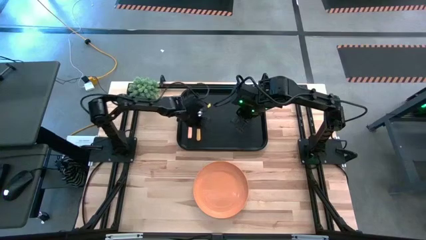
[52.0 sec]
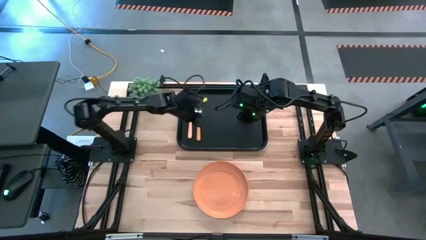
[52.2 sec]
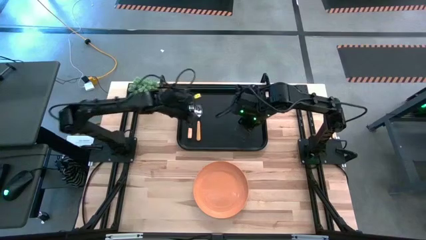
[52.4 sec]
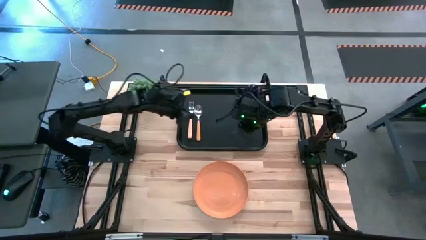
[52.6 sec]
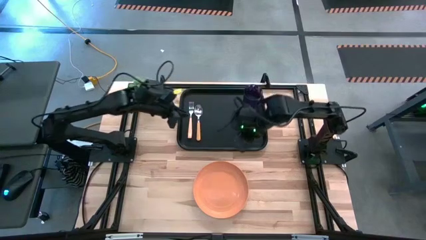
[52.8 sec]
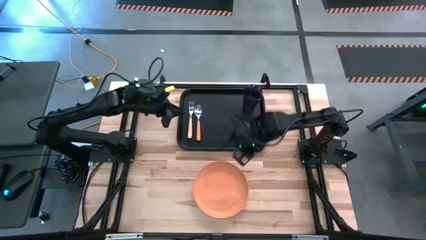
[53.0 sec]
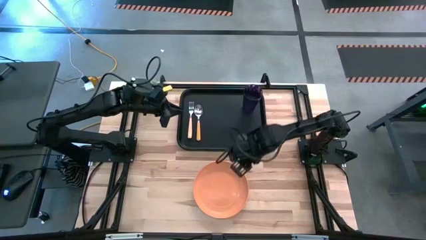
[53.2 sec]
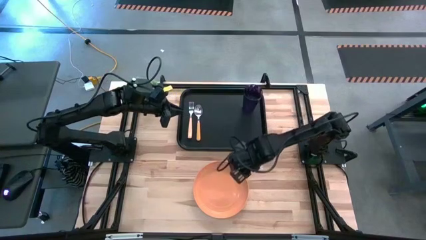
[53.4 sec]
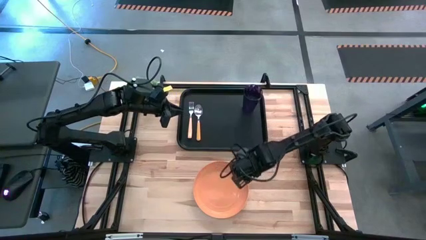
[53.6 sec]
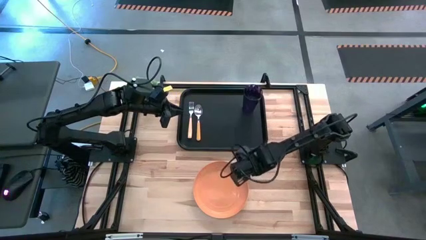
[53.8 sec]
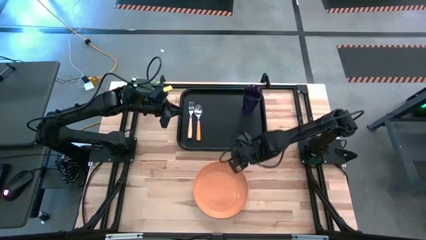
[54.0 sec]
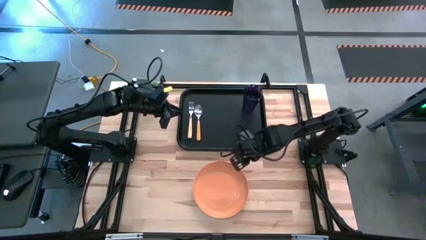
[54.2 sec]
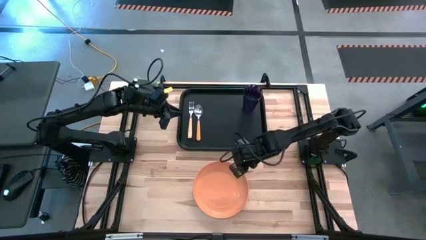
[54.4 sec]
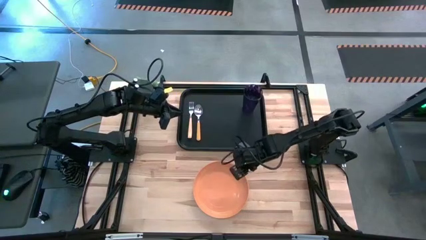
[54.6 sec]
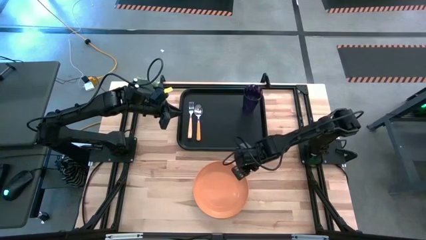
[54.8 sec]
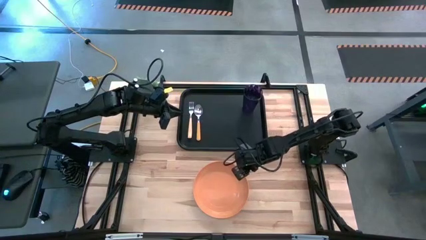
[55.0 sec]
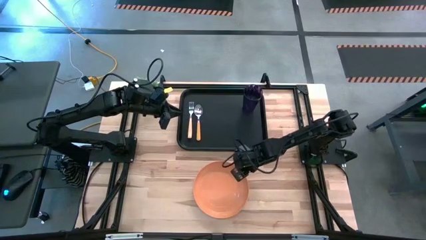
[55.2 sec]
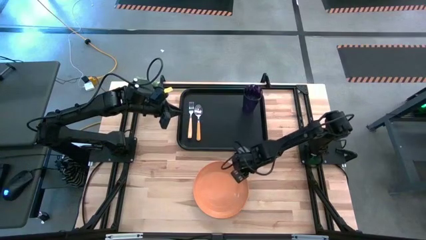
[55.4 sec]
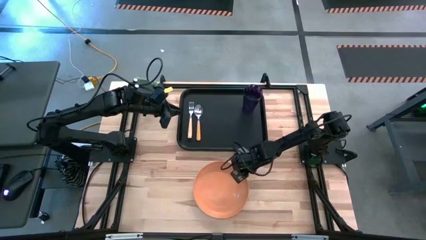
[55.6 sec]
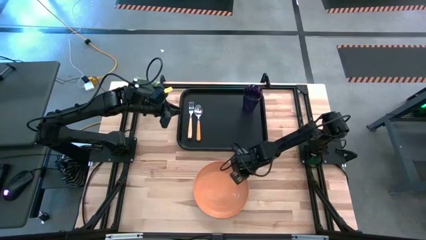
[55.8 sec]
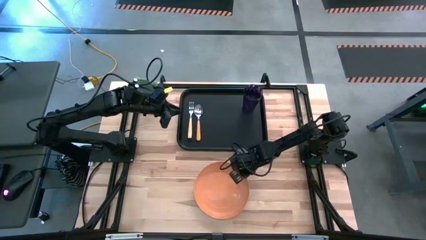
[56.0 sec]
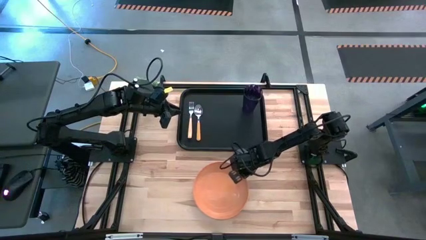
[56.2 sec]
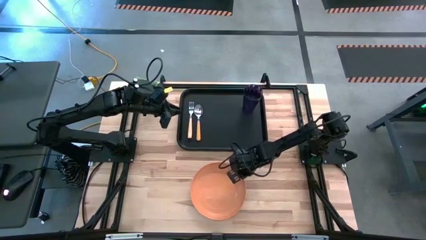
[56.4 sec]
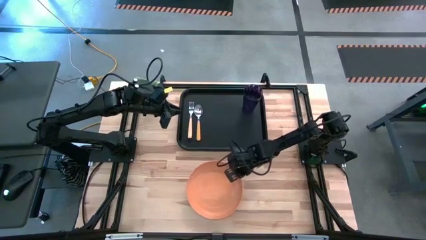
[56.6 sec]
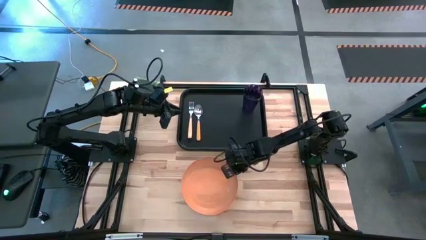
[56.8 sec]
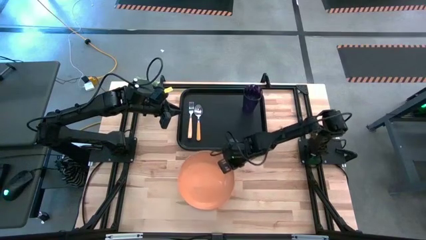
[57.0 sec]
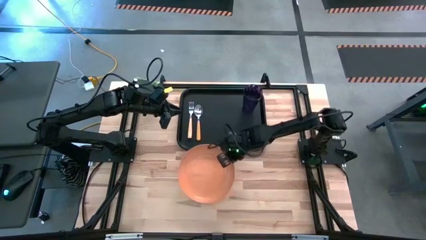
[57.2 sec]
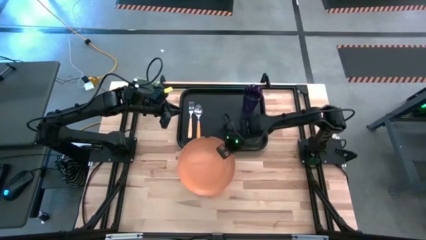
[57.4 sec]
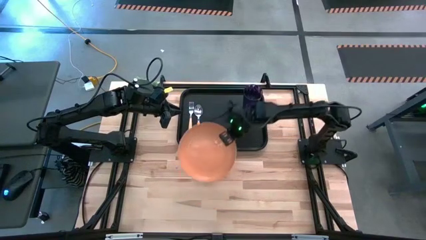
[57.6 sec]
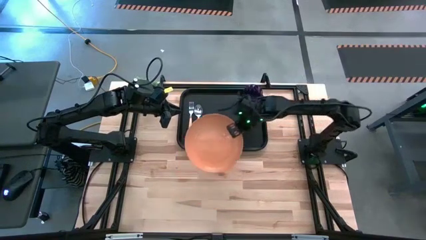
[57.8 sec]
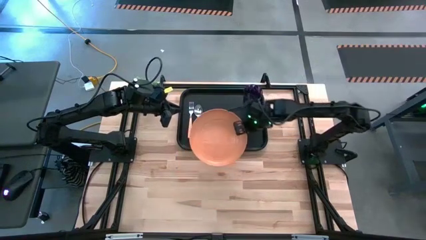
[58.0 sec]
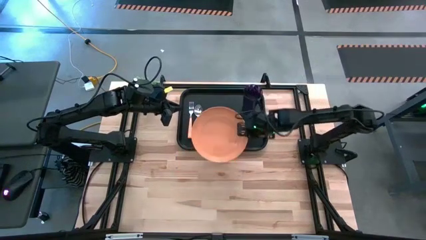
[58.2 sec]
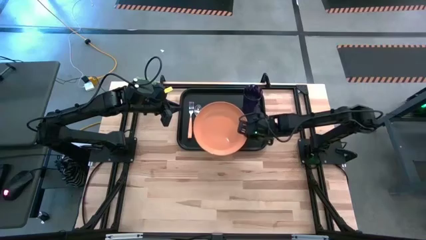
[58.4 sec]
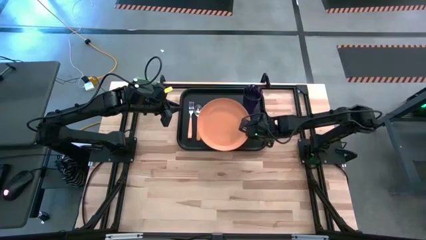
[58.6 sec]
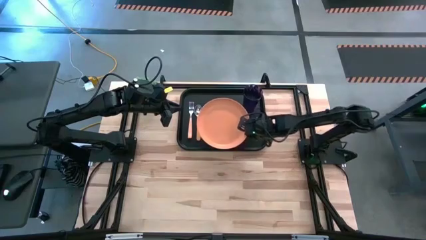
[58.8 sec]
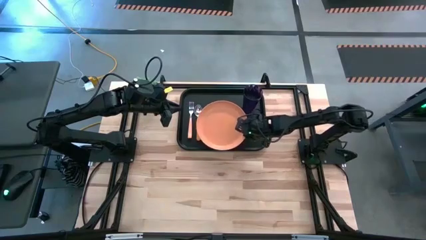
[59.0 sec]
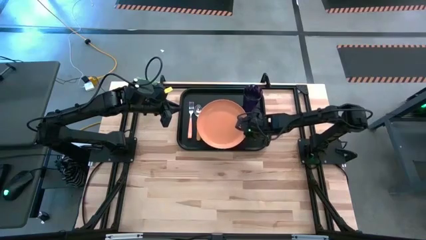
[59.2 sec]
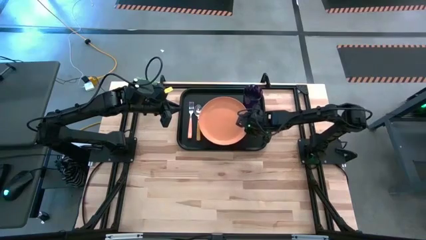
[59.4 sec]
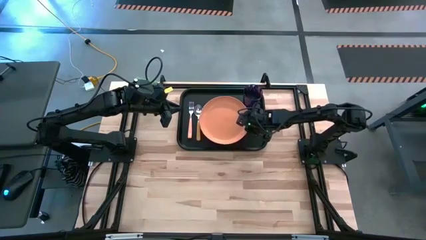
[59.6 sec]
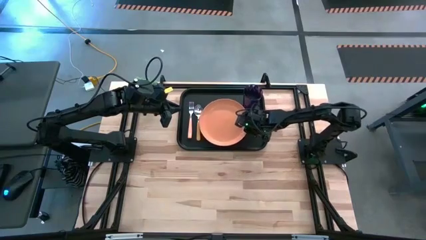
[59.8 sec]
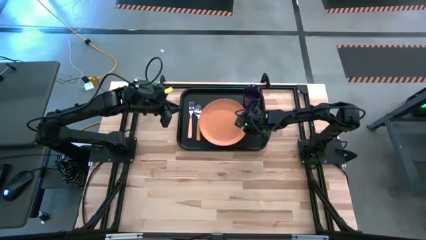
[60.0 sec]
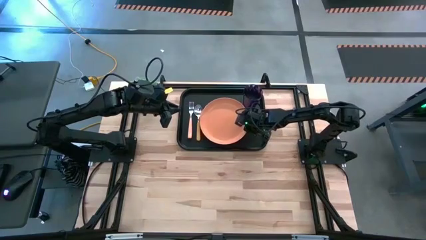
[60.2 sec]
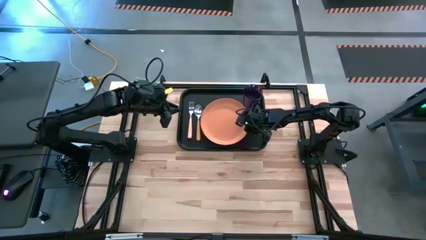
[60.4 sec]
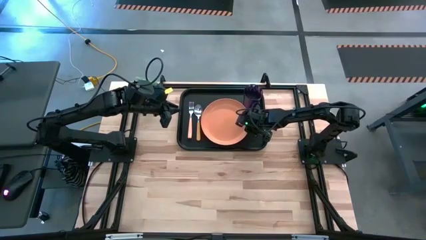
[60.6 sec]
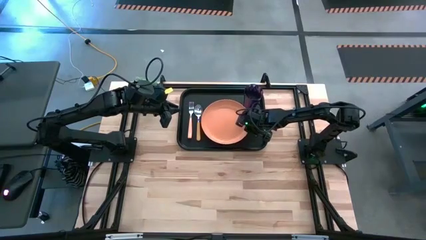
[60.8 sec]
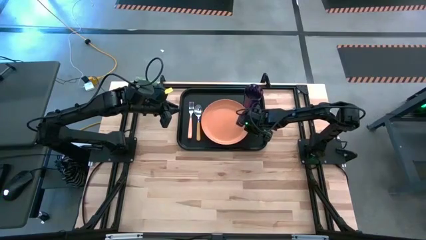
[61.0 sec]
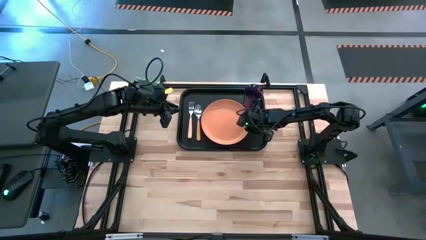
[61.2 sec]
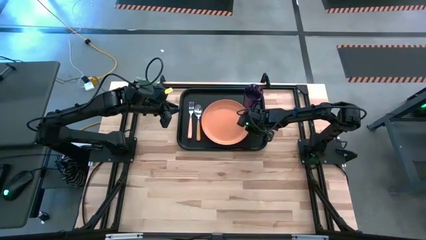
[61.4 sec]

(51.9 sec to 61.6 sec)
Task: Pick and place plate/cup/fork/spoon on tray
Put the orange plate to the right of the orange spoon on the black serving tray

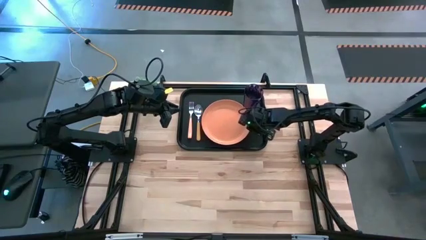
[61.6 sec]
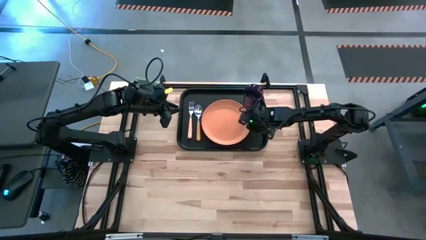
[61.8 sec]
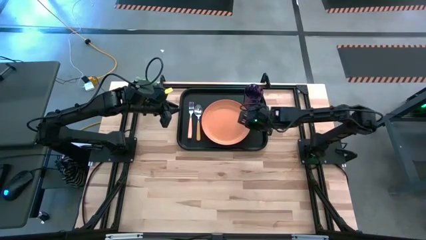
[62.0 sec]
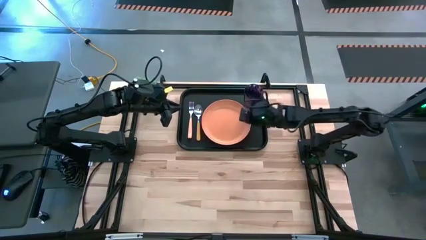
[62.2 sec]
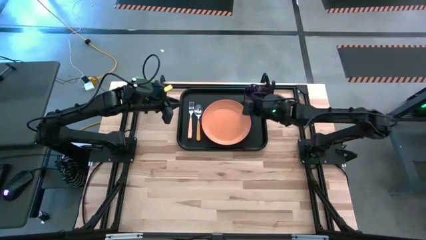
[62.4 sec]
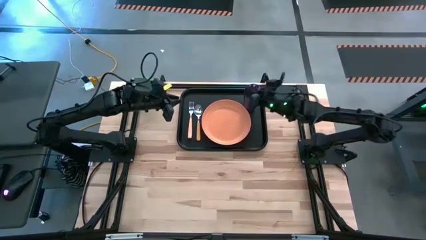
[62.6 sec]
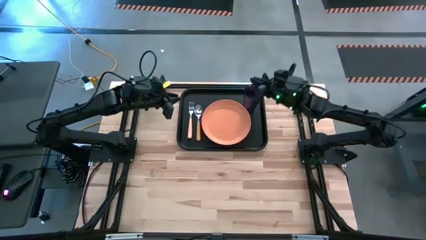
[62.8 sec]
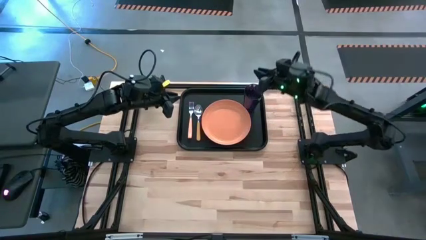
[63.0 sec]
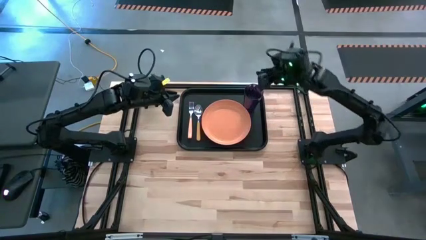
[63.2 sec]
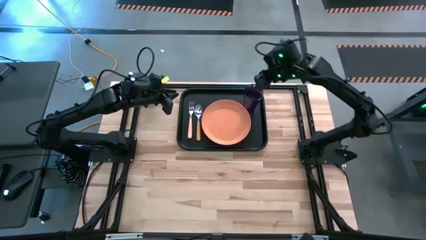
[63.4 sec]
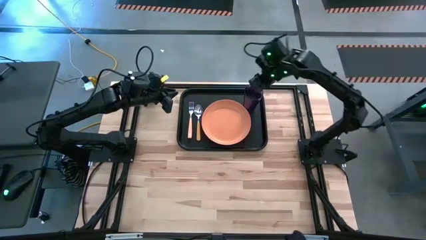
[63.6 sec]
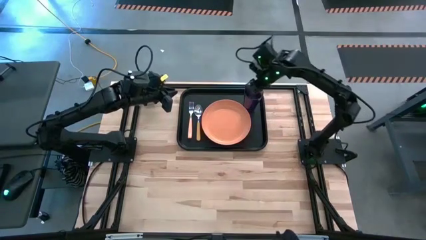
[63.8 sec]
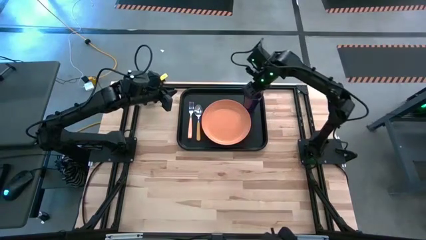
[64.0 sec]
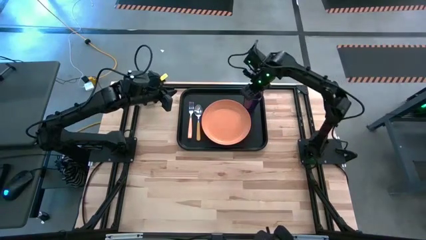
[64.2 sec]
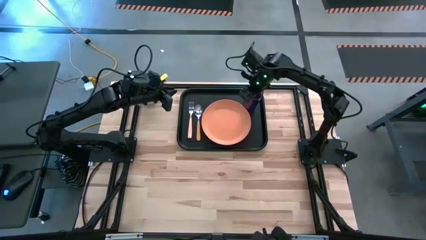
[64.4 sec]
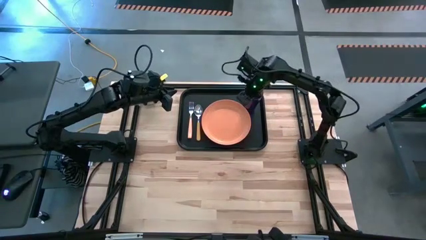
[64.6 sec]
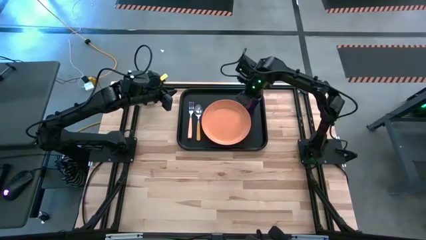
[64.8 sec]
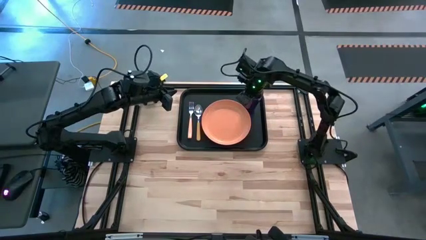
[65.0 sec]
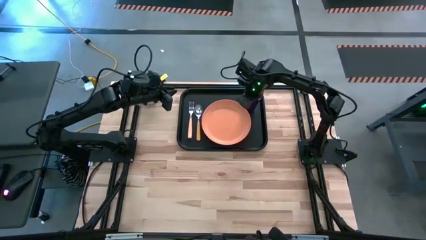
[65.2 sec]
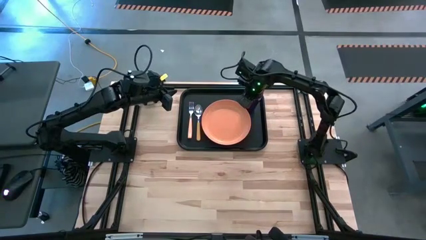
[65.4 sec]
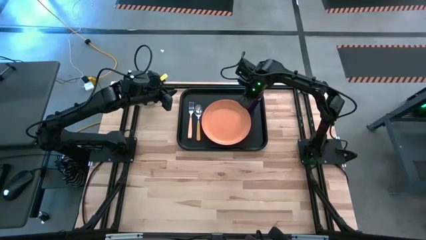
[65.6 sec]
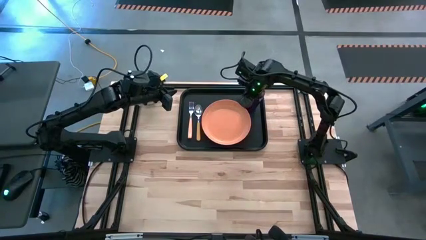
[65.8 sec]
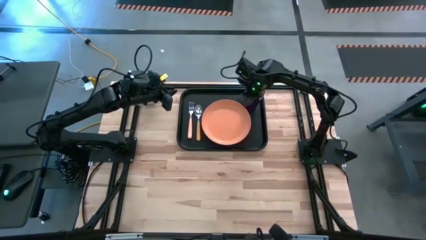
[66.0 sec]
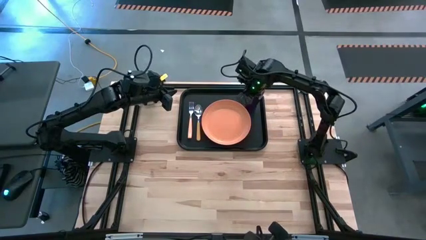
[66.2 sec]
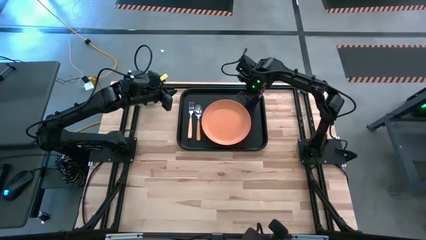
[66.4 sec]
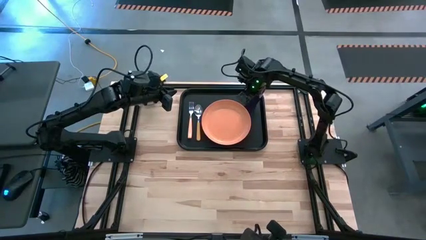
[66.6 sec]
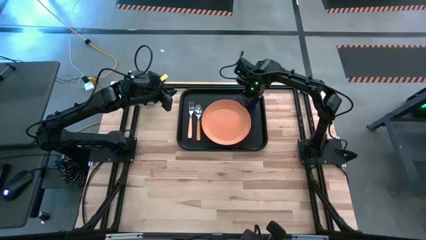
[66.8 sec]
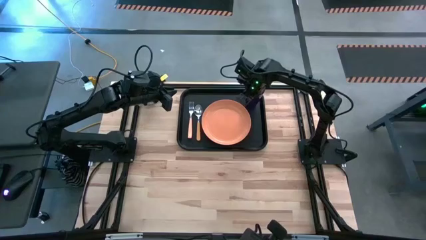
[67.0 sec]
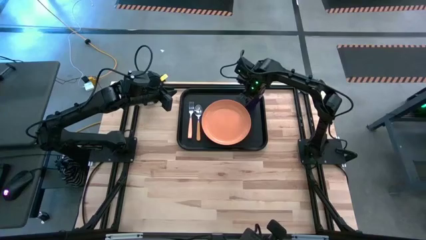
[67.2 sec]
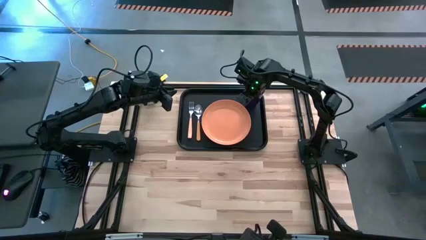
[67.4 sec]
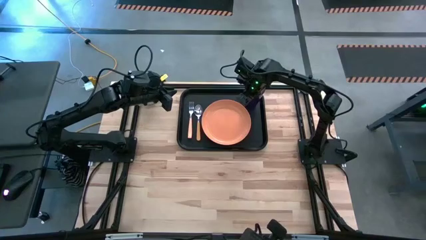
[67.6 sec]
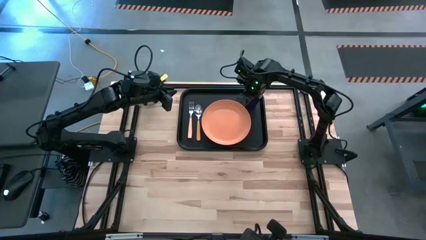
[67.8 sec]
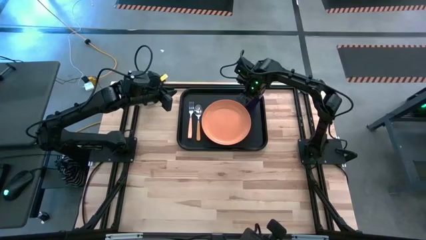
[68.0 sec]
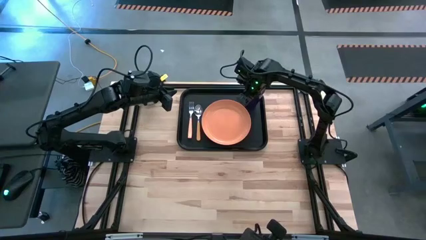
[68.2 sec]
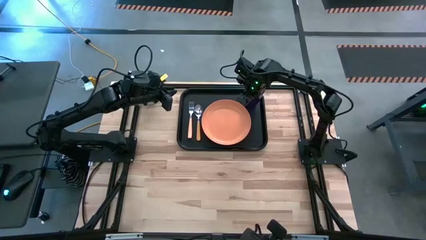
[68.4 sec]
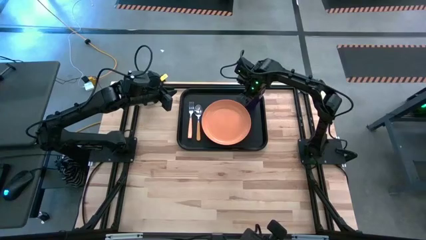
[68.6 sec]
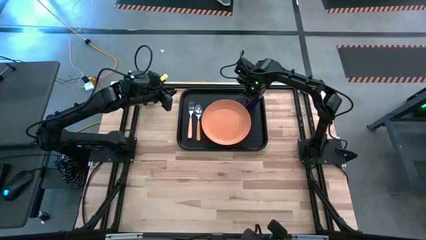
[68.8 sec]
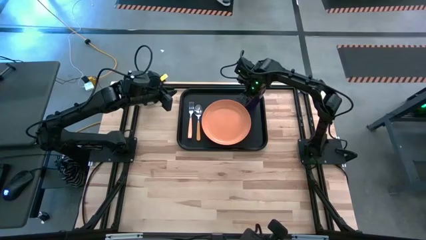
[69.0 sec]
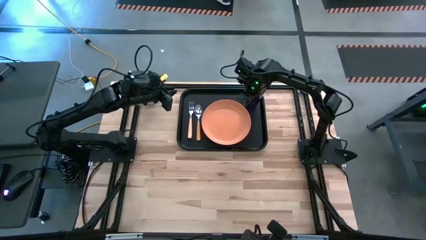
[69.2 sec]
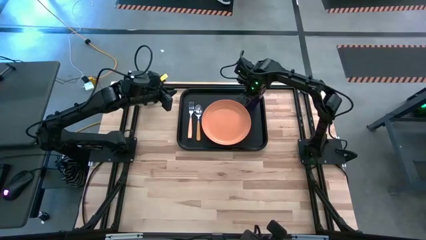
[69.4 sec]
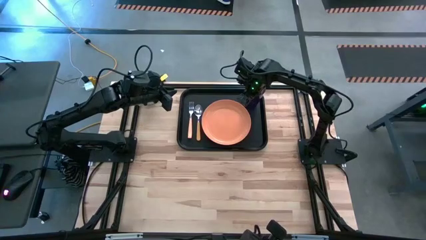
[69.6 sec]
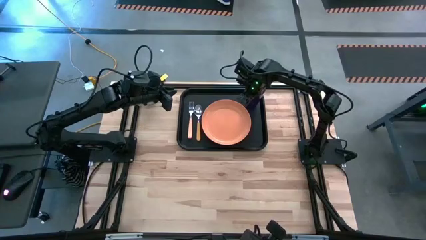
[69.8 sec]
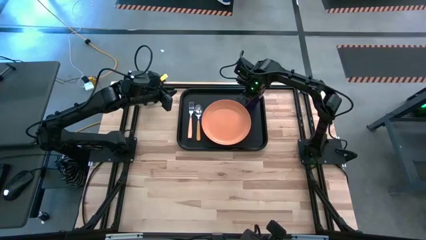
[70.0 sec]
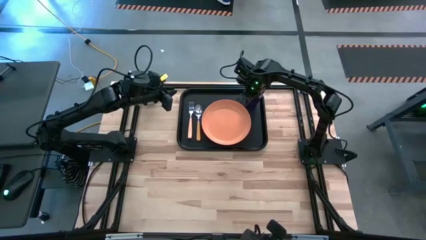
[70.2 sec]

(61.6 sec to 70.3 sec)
Adjust the violet cup on the black serving tray
